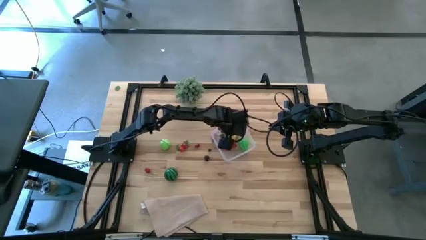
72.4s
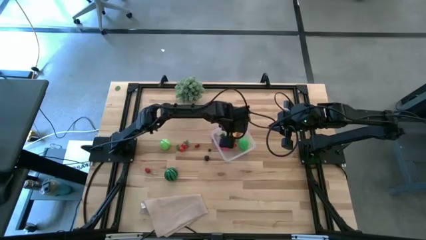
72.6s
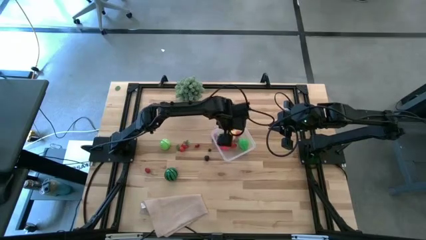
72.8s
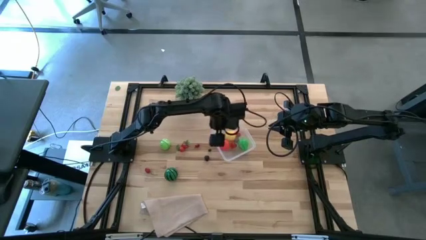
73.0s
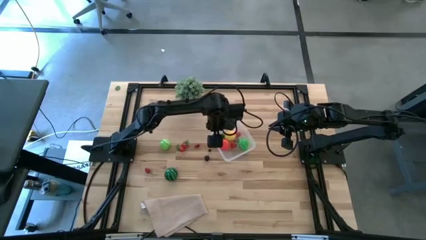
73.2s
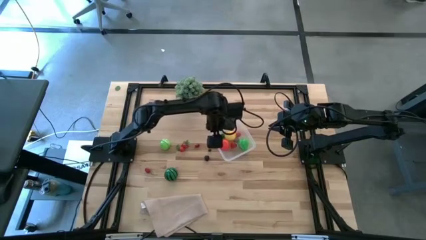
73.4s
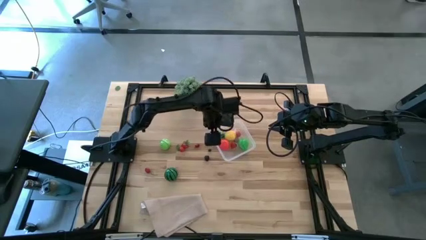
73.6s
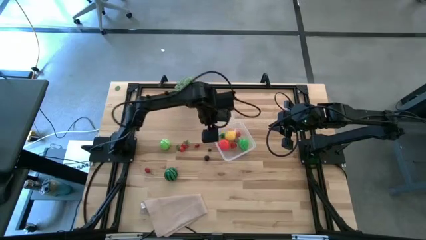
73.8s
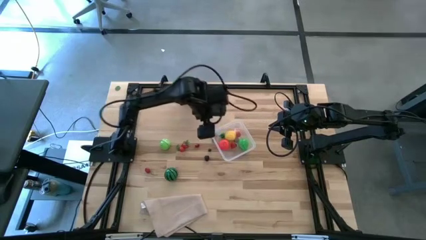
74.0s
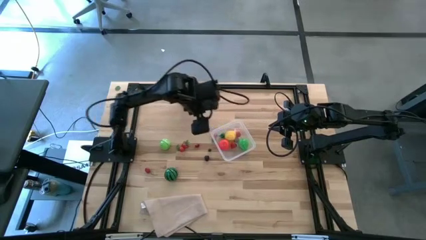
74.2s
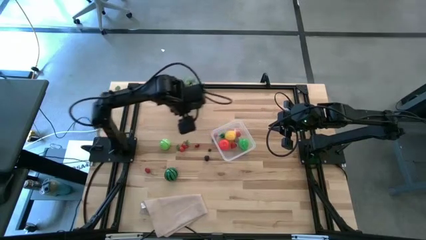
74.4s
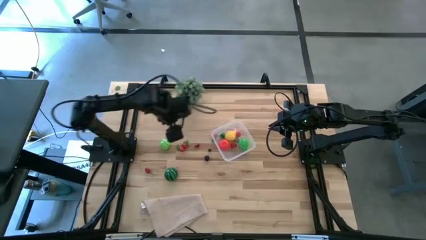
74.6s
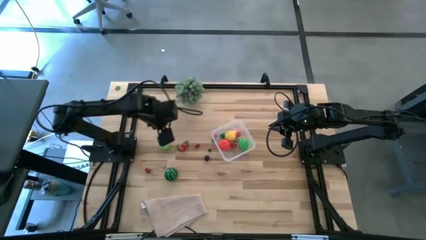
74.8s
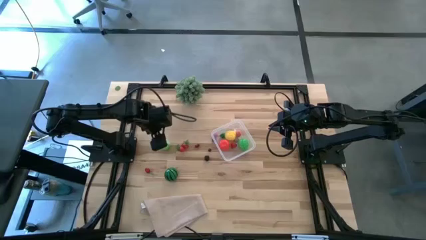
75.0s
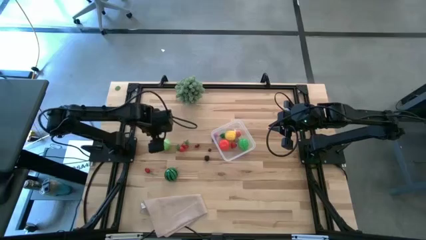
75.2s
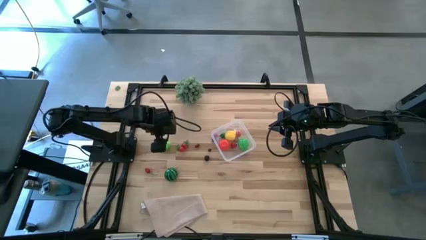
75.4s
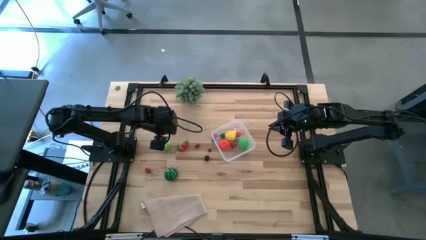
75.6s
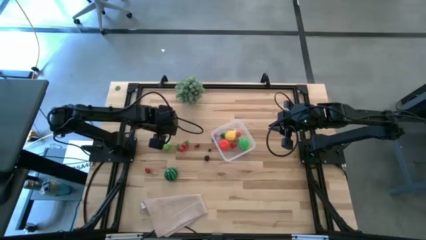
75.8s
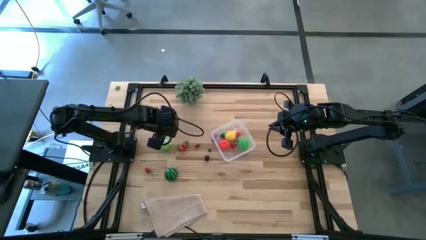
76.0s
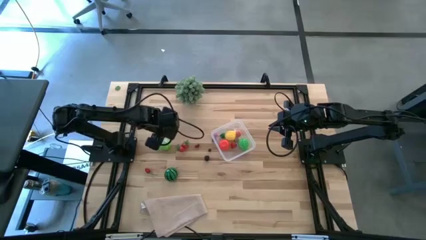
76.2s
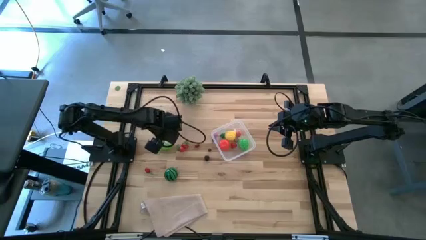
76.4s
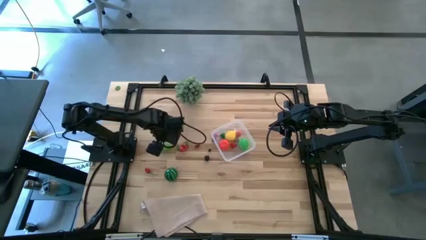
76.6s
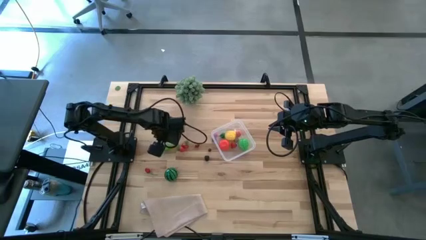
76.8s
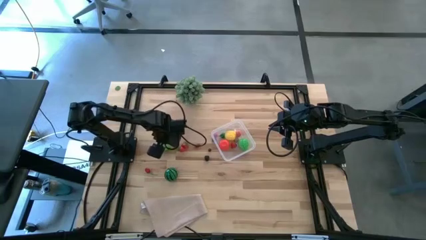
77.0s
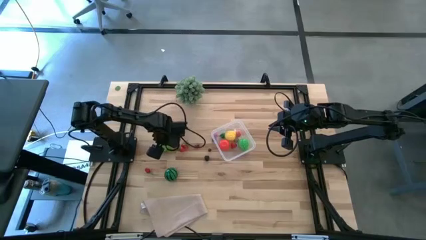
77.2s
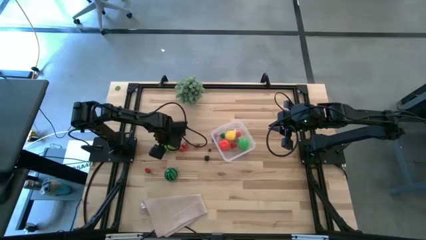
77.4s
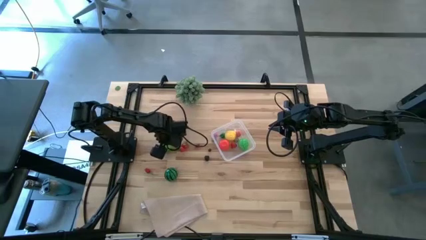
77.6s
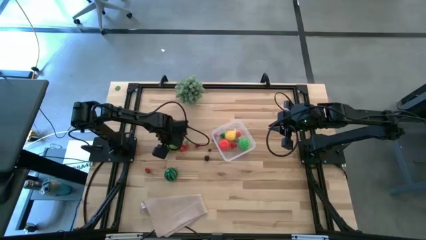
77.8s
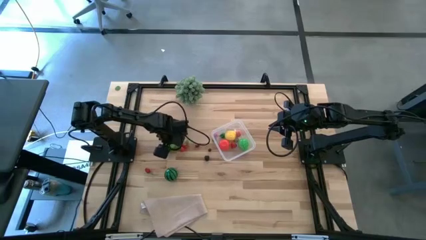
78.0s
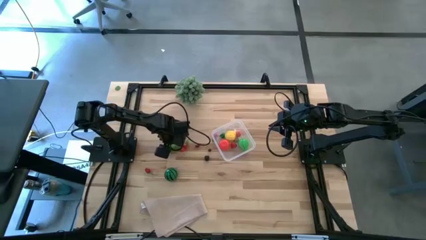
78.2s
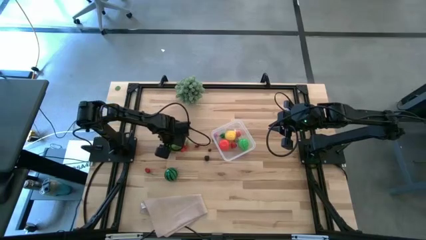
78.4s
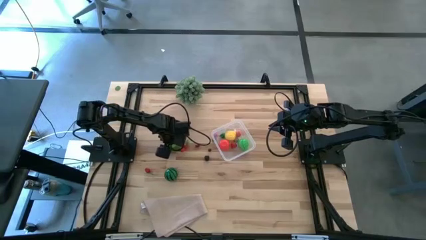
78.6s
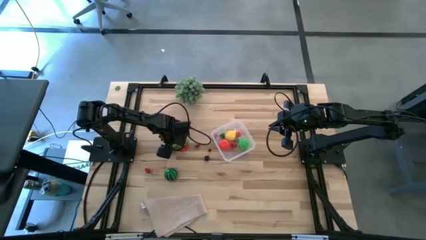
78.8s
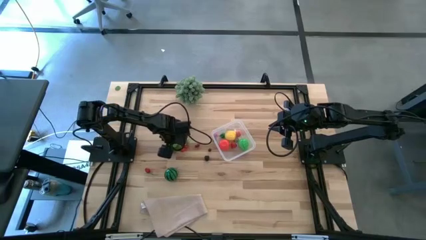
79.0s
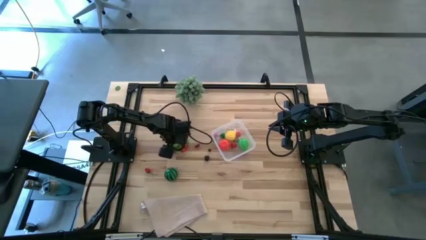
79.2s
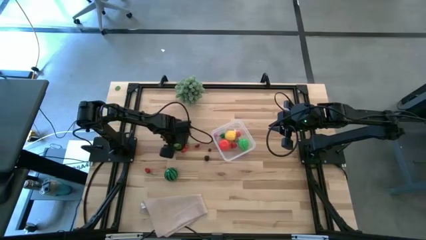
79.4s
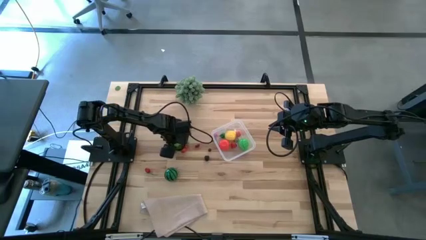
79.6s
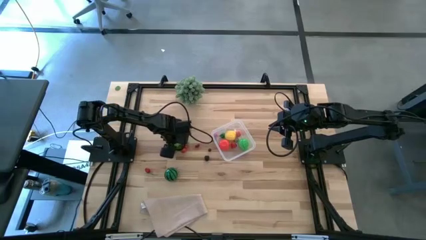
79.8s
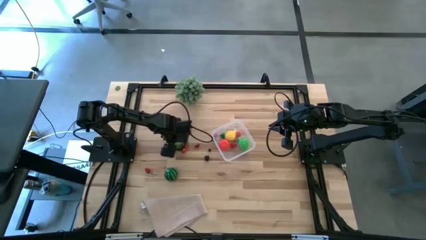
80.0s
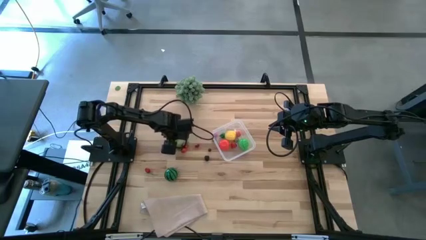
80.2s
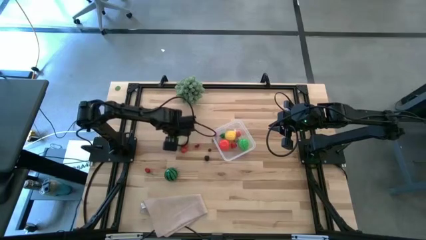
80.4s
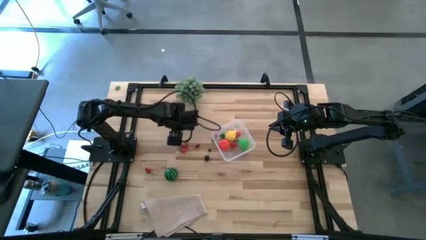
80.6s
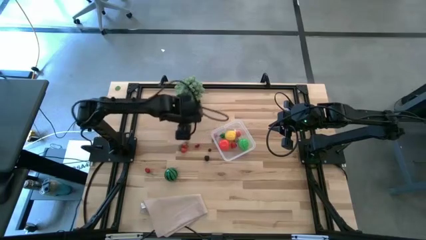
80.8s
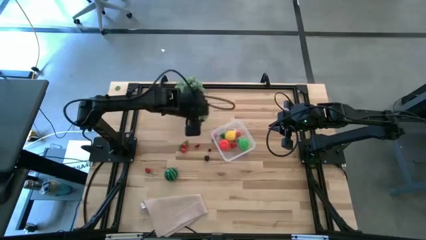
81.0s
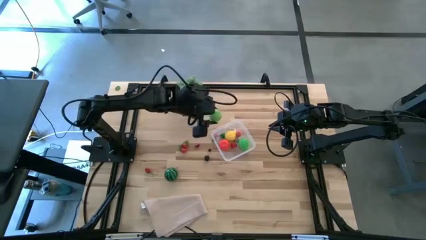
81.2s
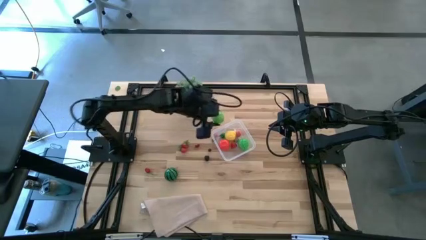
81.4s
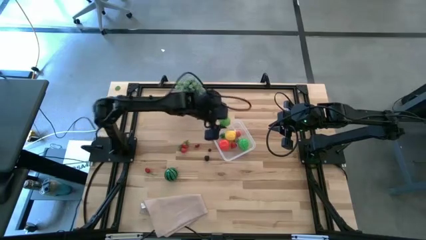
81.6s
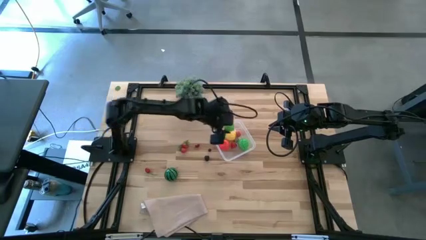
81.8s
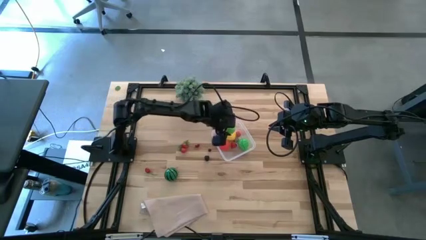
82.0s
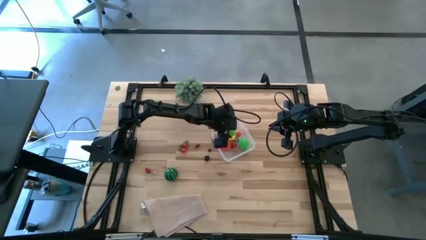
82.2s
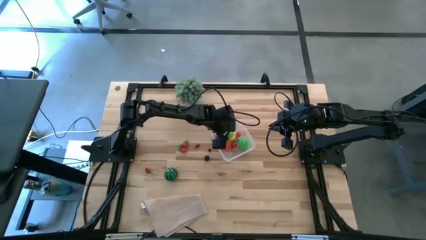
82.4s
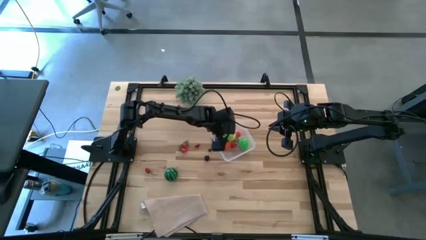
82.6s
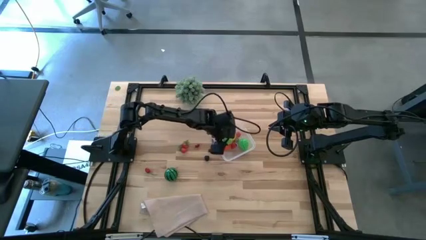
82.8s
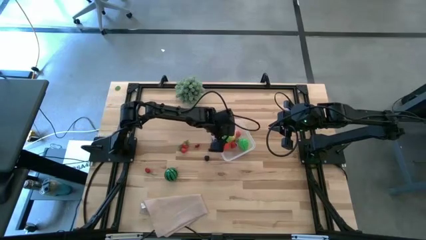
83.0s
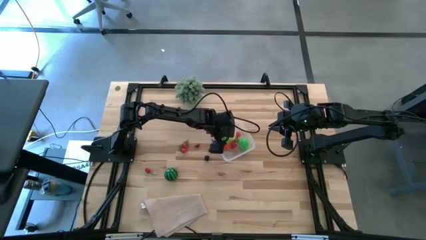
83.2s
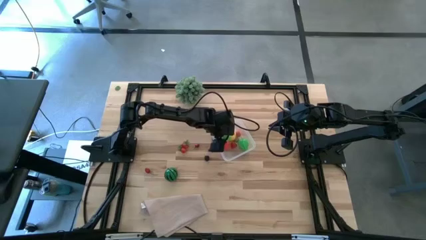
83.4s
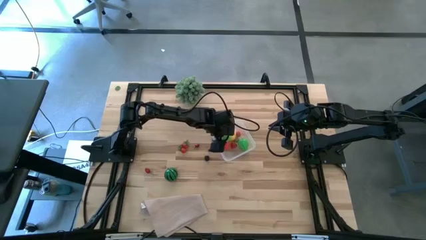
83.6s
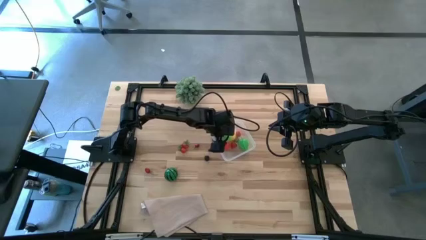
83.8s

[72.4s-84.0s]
Task: Pick and placing Produce into tupperware
Put the cabbage into the transparent bin

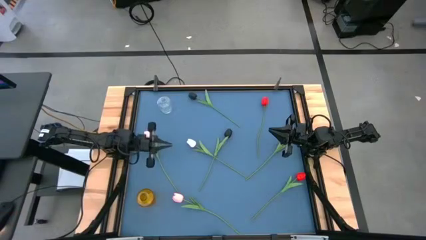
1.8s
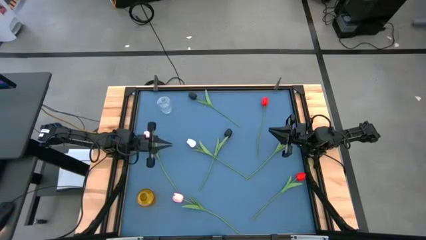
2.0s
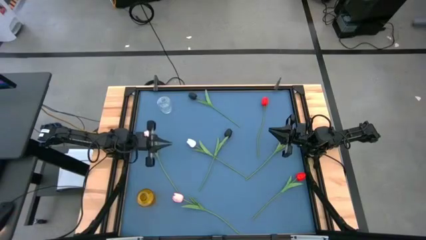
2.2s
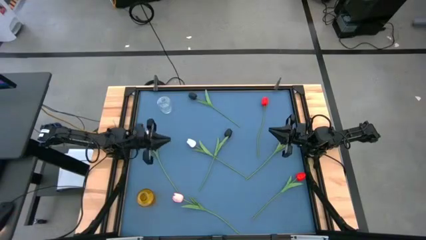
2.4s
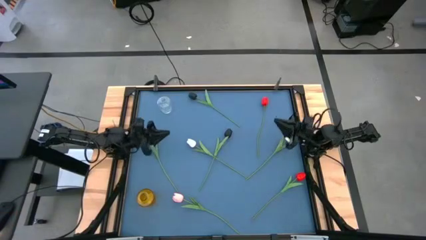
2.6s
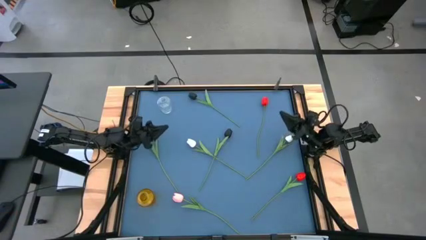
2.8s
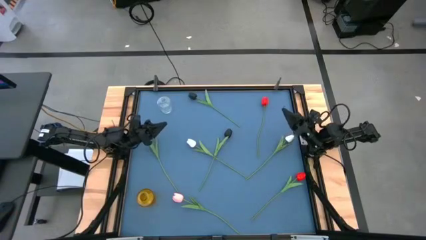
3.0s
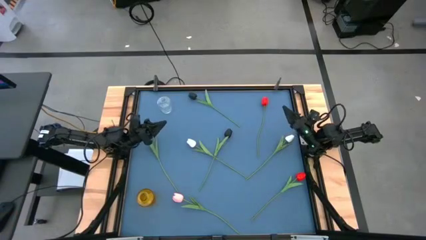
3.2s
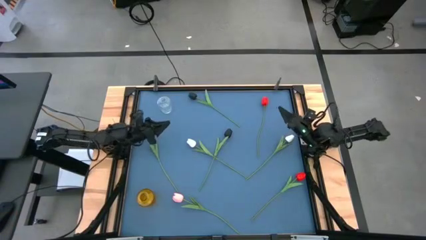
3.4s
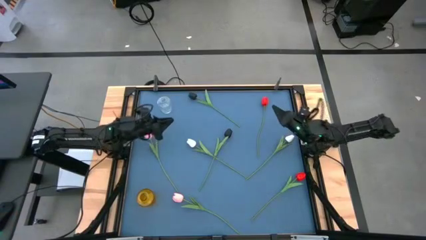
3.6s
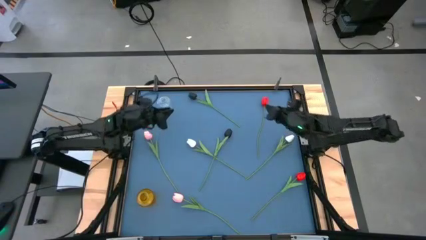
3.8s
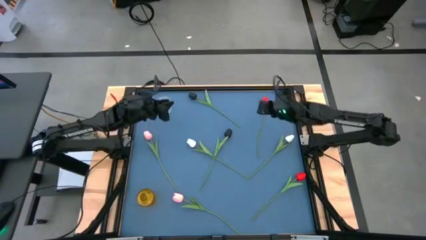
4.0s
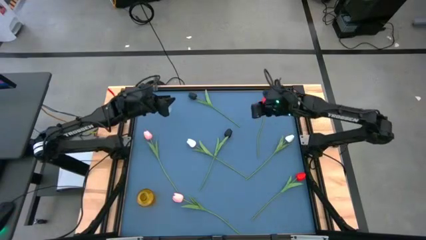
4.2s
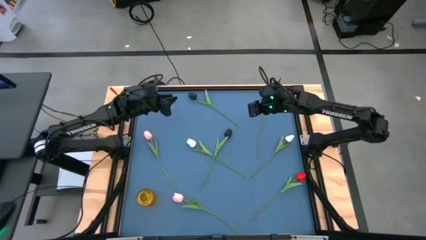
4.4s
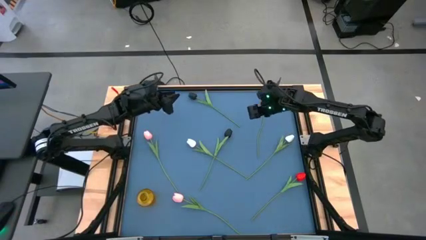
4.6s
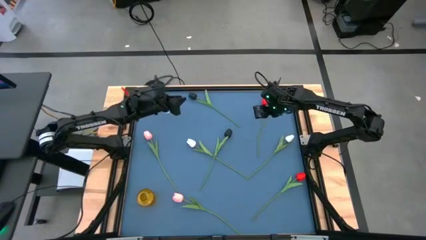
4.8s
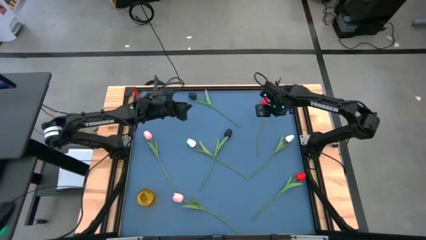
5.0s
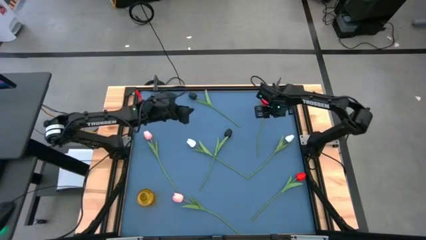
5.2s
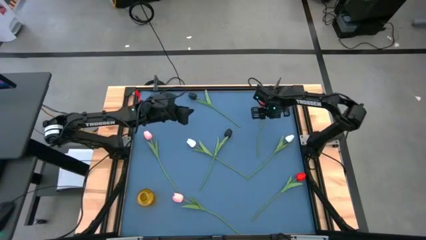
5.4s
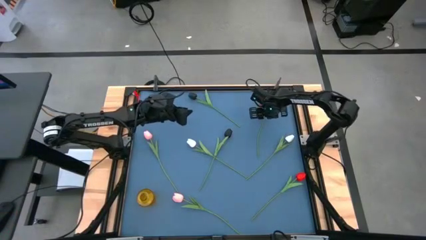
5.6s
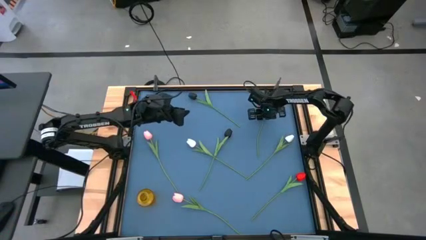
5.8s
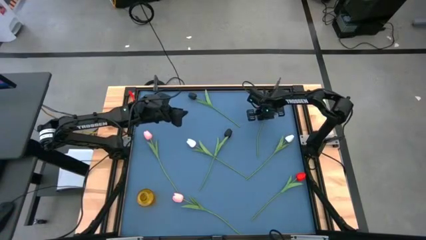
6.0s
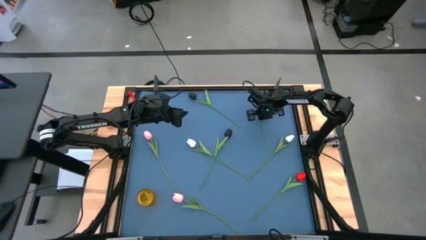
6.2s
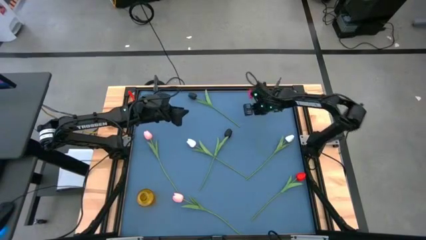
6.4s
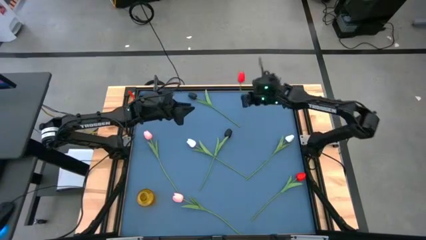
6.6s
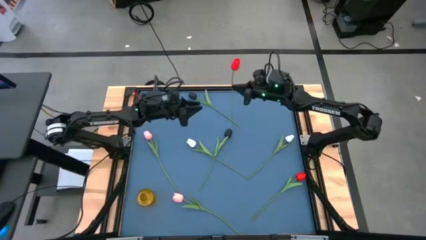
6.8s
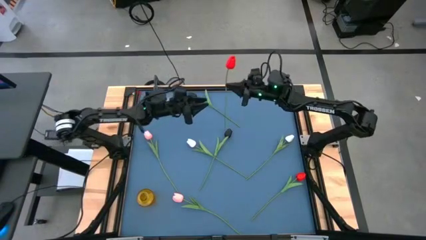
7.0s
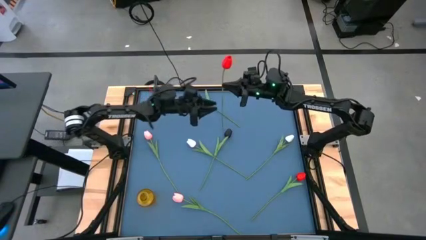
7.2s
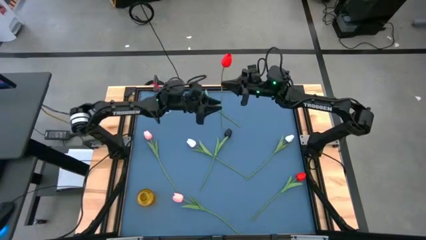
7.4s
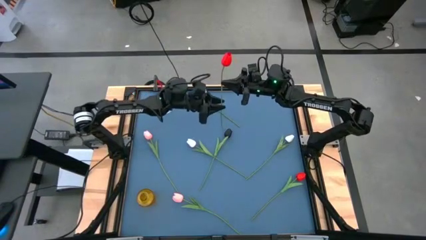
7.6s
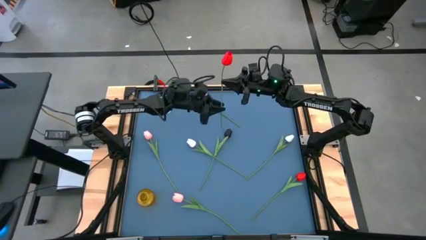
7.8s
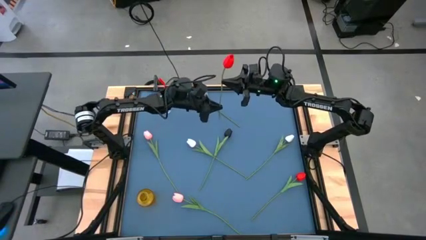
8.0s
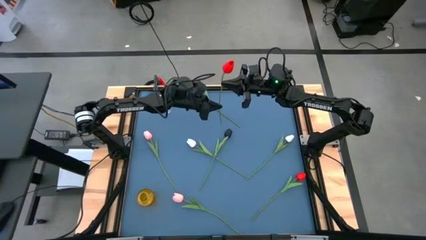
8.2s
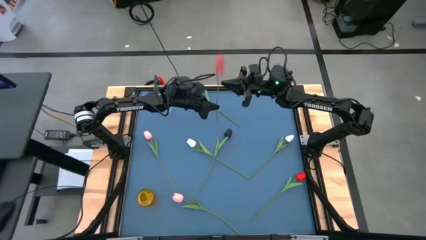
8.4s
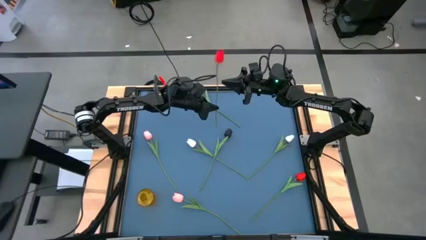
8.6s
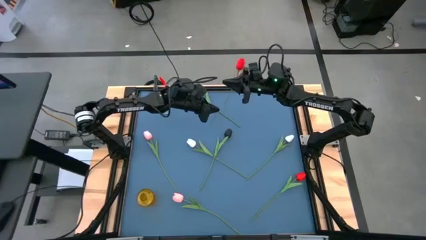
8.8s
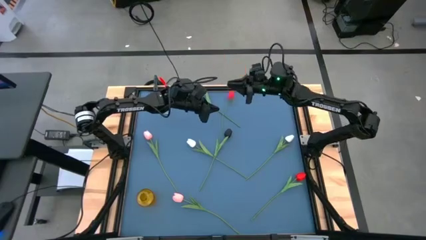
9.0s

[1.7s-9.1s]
Task: Sort flowers into vase by color
Put the top red flower into the transparent vase
